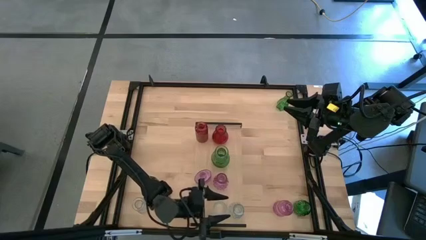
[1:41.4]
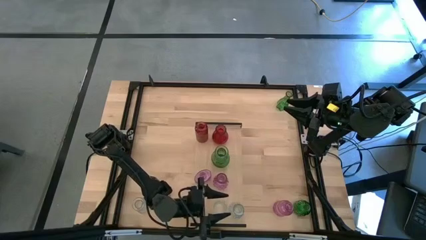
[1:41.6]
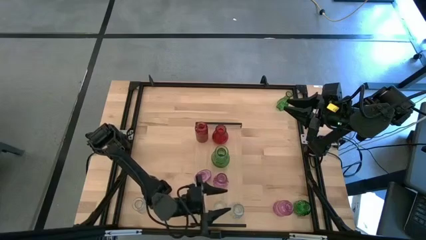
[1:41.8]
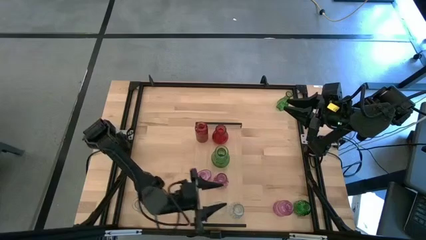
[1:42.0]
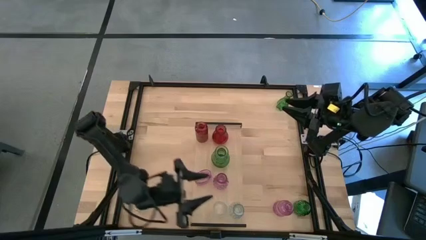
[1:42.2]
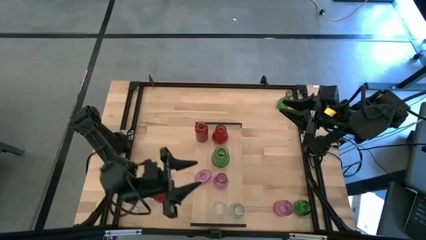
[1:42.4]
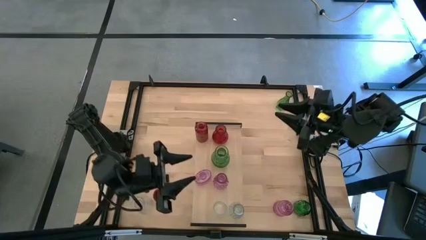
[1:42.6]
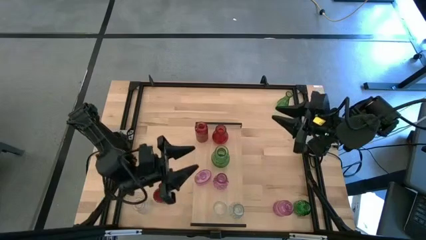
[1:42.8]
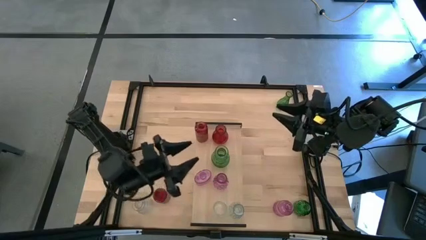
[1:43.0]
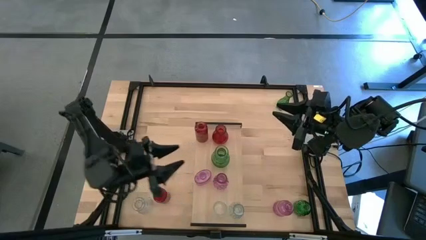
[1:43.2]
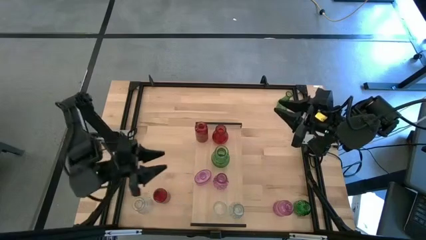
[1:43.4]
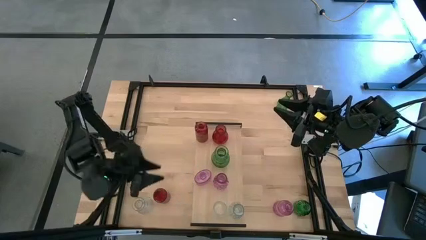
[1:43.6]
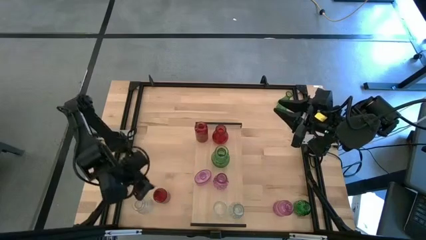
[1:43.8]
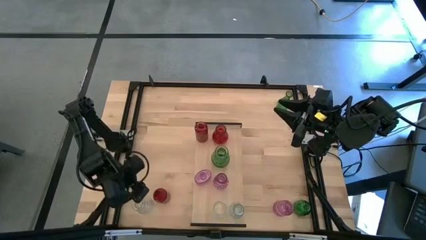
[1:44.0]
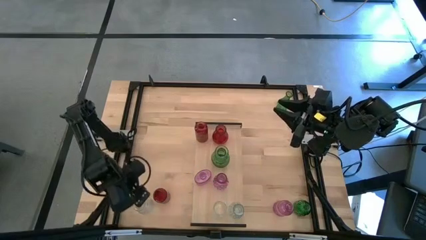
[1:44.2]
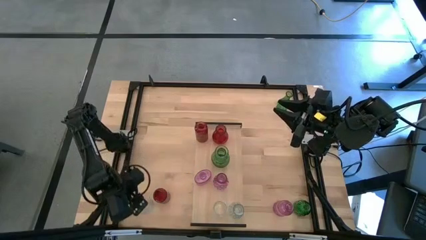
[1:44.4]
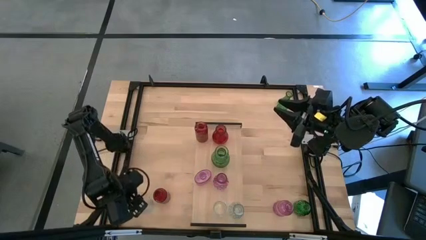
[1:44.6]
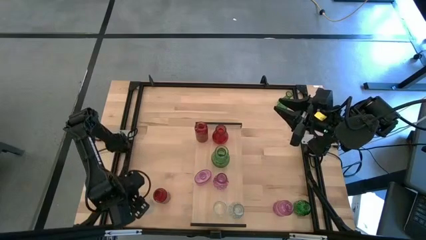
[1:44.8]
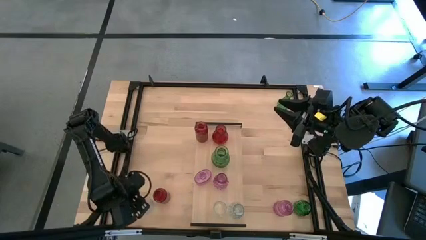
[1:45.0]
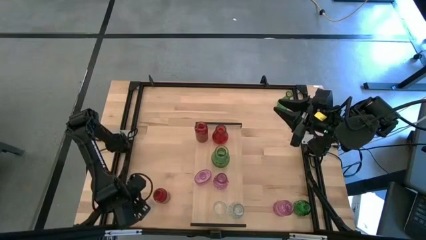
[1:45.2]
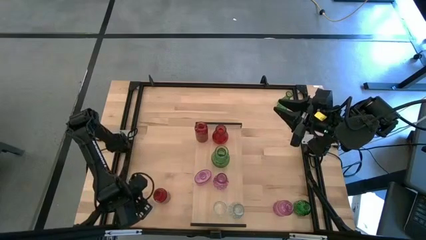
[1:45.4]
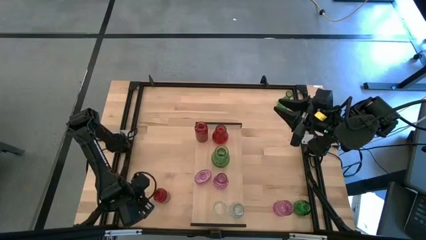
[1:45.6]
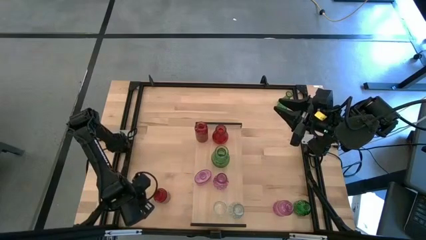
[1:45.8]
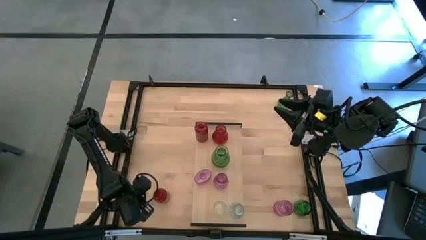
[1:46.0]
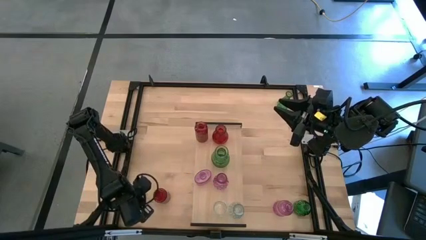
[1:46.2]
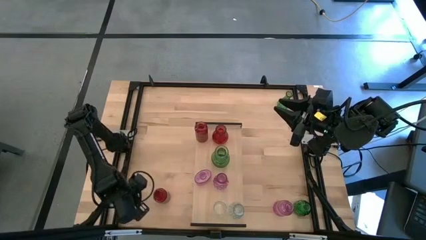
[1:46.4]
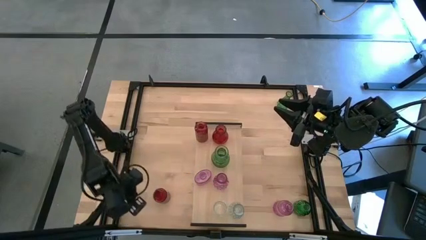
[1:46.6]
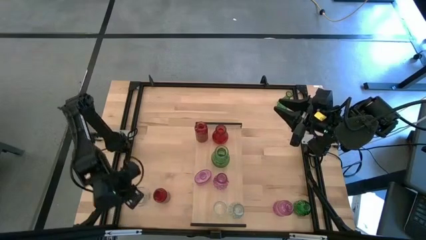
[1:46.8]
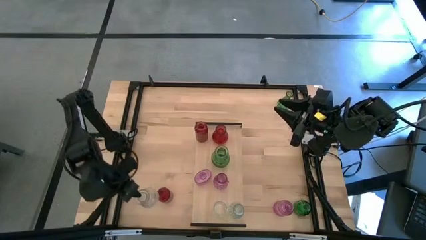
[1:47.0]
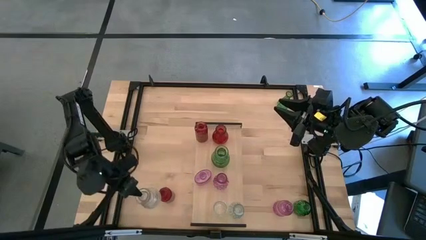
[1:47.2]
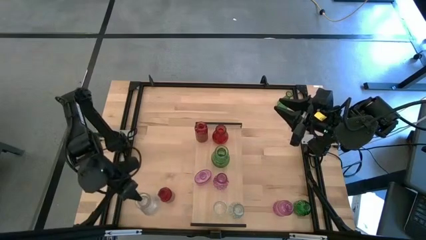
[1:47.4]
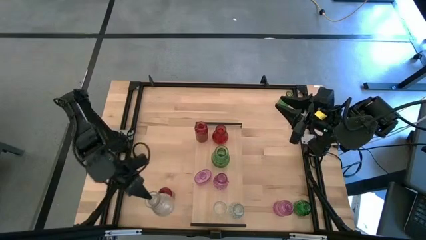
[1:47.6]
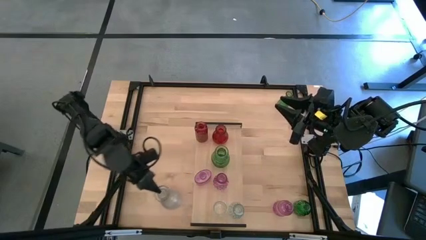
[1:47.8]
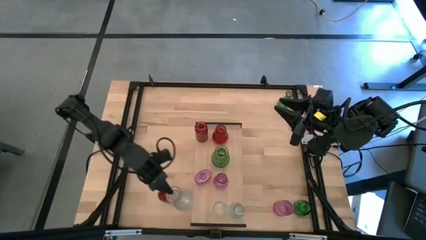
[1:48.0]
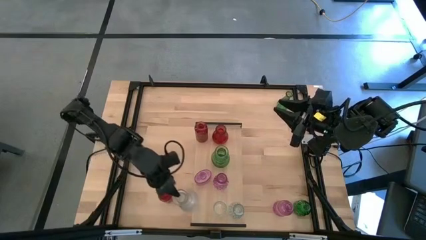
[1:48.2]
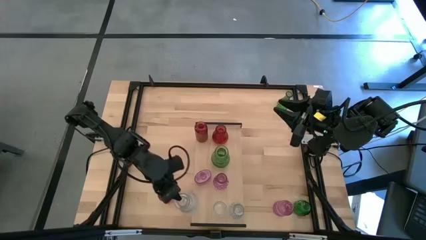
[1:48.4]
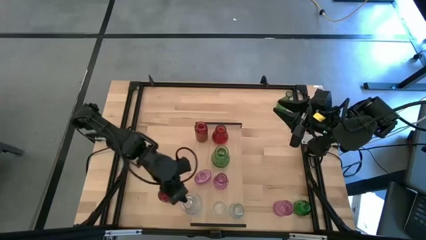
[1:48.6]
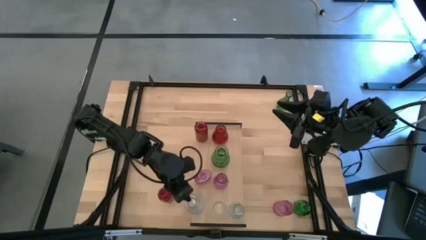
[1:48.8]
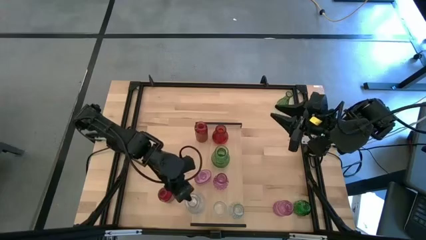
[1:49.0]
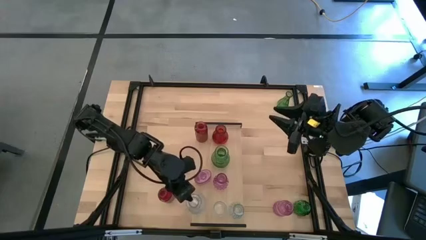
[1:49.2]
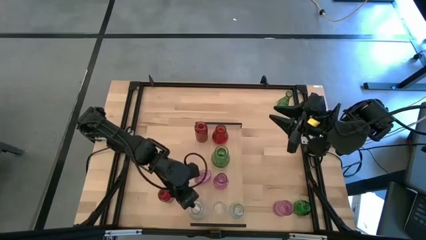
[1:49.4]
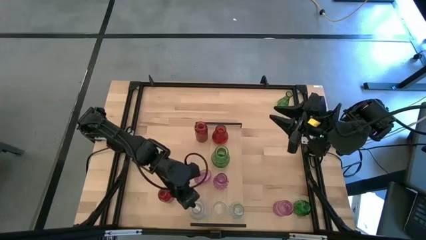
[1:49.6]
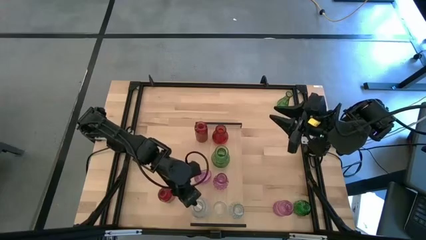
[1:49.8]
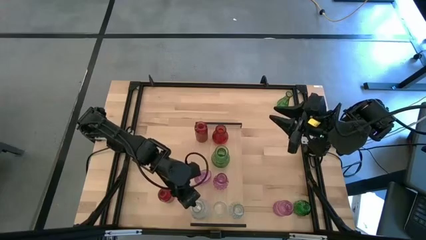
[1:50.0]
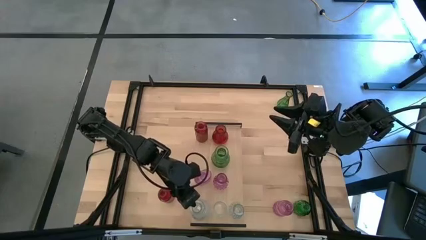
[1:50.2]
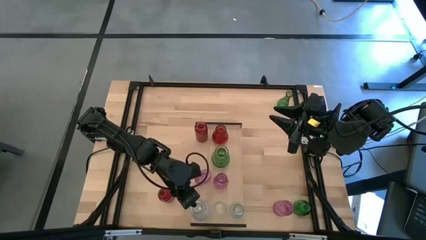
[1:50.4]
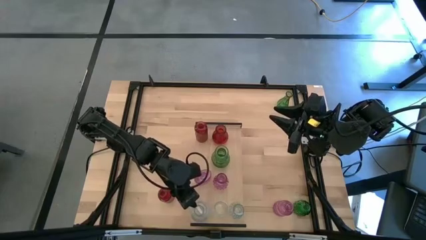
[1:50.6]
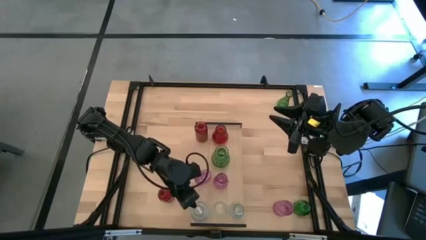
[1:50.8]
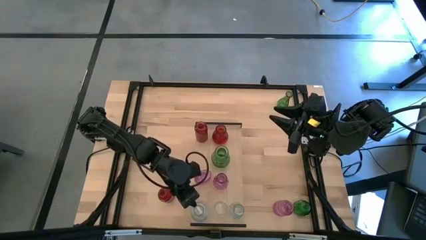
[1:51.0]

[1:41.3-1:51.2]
Task: sort vases onto shelf
Put the top white vase on the shelf aligned with the other white vases

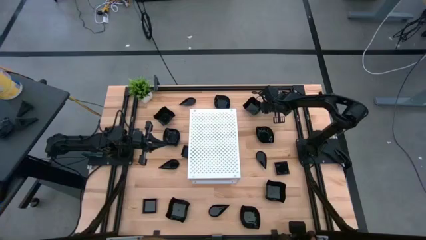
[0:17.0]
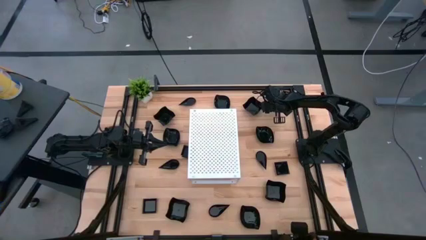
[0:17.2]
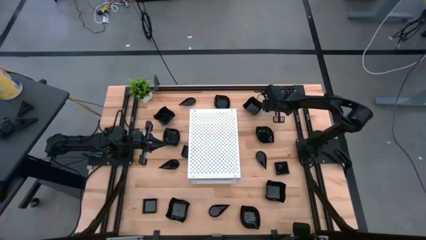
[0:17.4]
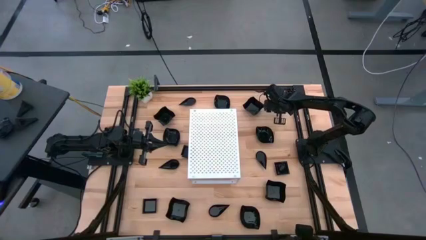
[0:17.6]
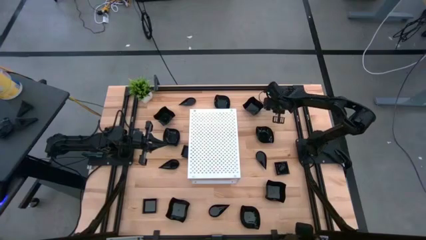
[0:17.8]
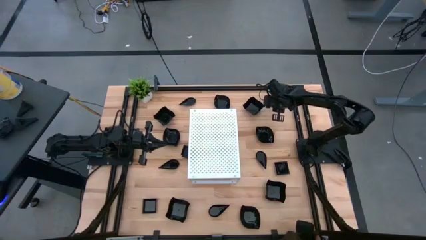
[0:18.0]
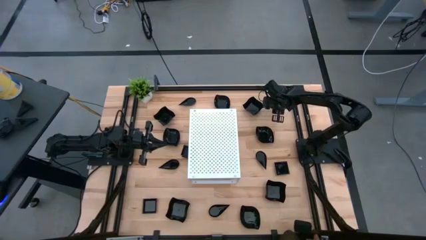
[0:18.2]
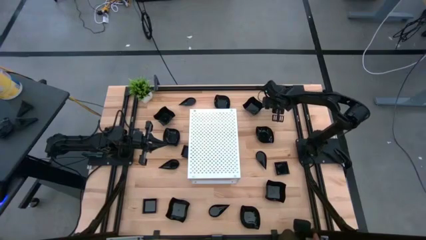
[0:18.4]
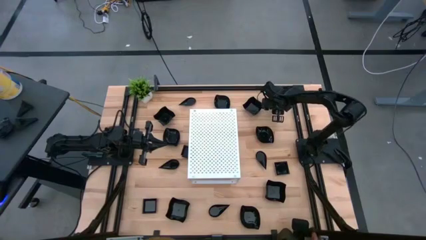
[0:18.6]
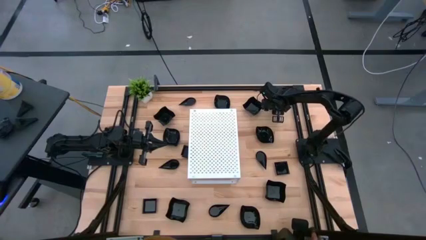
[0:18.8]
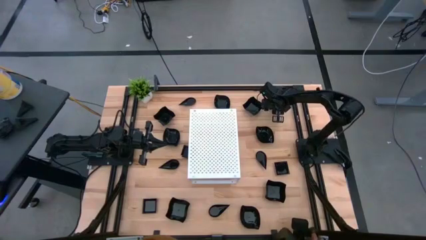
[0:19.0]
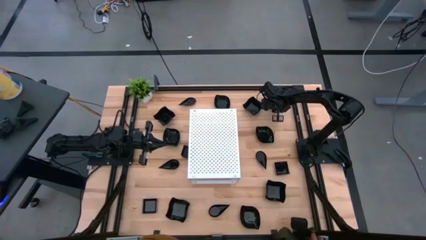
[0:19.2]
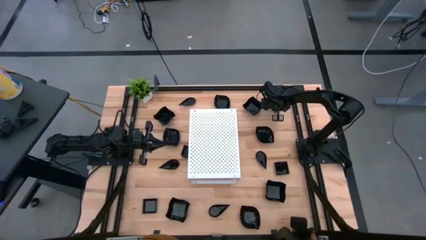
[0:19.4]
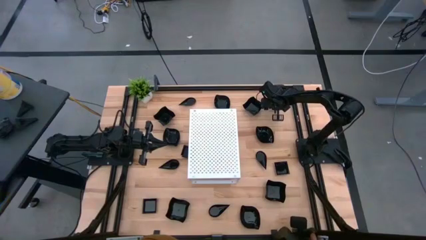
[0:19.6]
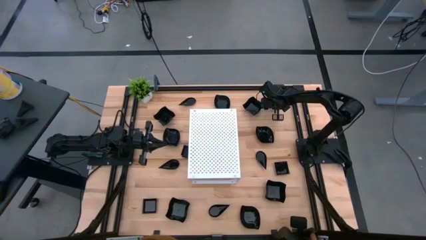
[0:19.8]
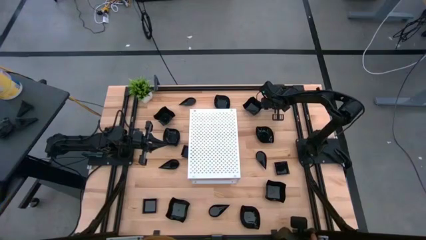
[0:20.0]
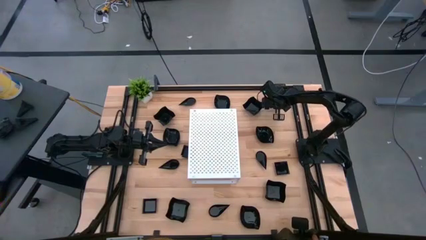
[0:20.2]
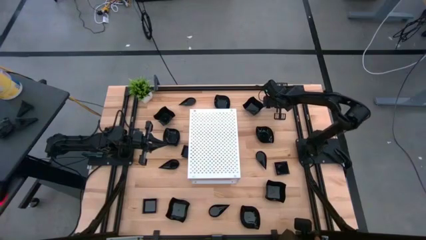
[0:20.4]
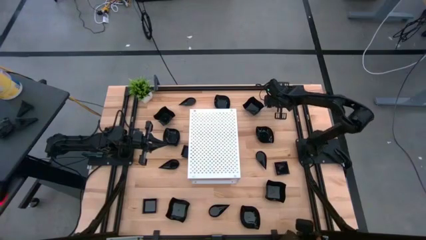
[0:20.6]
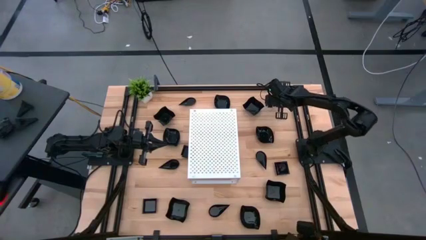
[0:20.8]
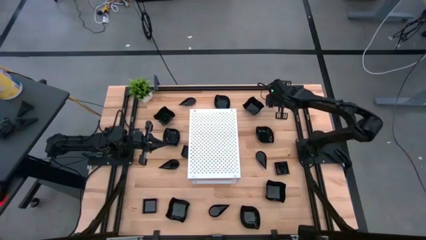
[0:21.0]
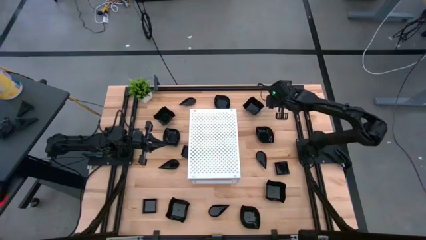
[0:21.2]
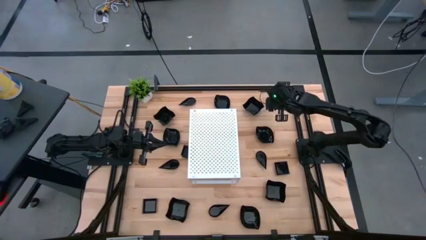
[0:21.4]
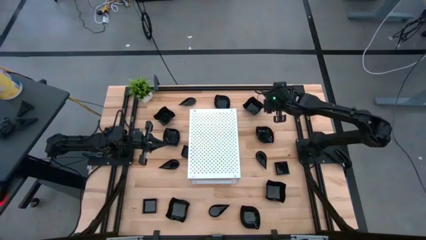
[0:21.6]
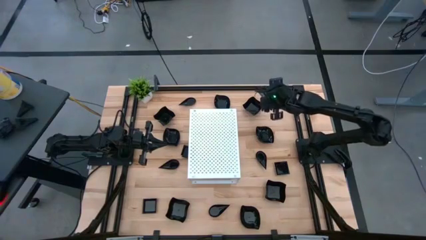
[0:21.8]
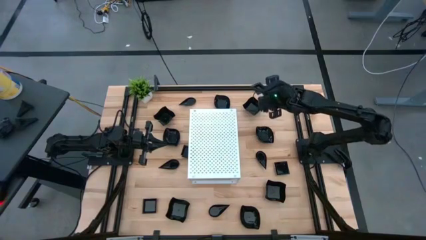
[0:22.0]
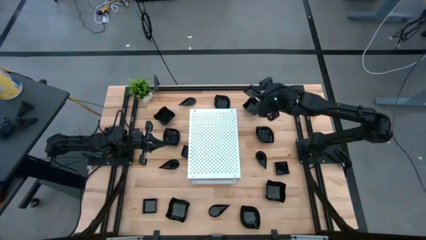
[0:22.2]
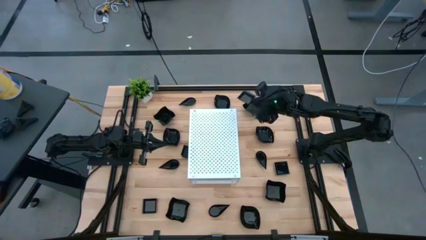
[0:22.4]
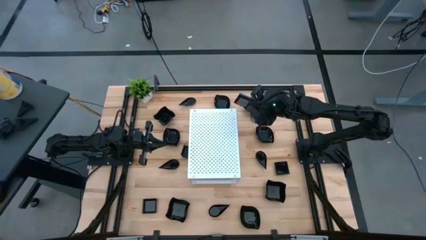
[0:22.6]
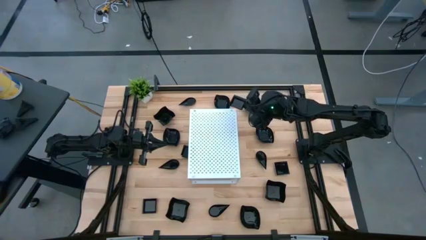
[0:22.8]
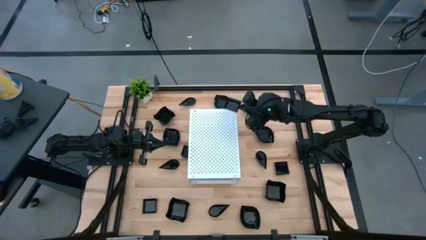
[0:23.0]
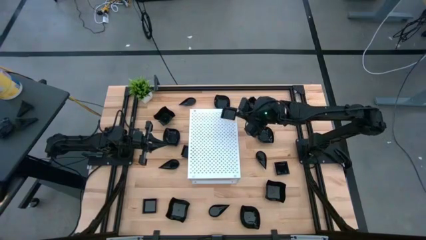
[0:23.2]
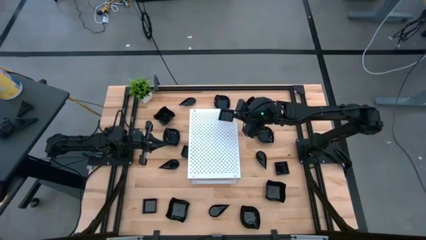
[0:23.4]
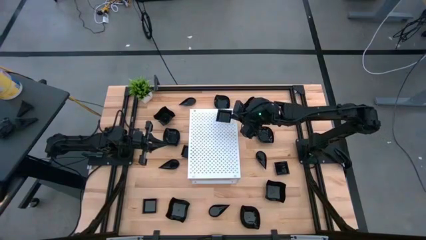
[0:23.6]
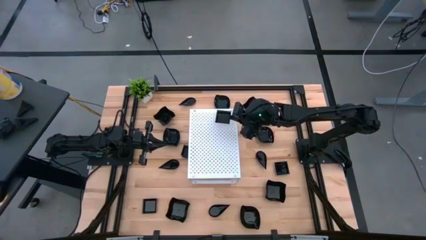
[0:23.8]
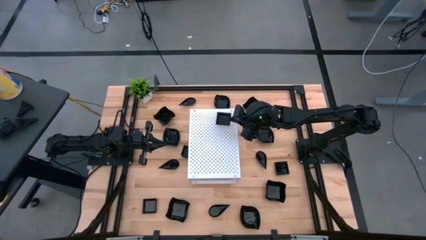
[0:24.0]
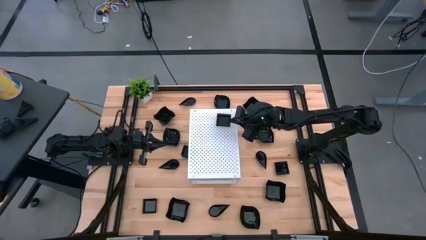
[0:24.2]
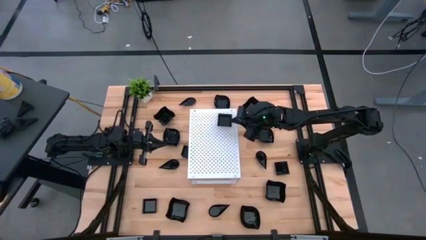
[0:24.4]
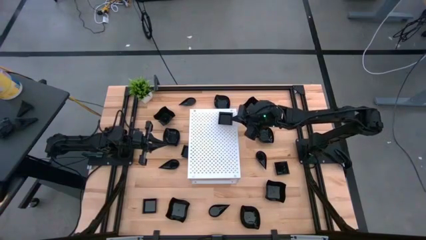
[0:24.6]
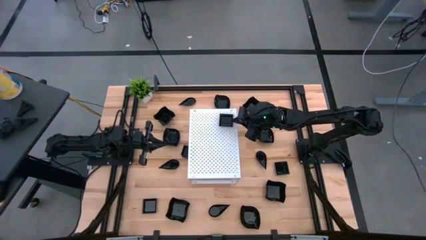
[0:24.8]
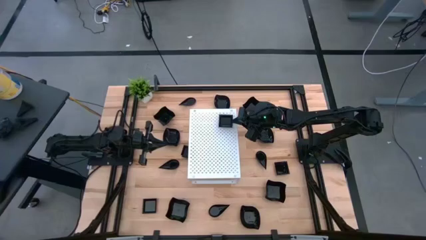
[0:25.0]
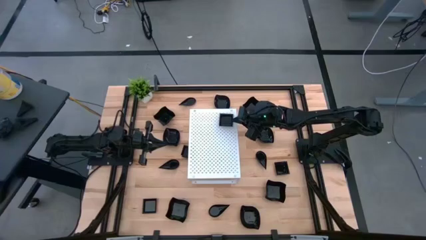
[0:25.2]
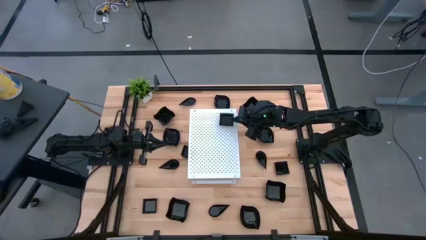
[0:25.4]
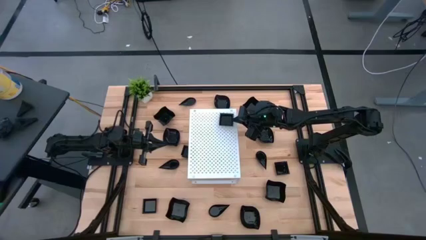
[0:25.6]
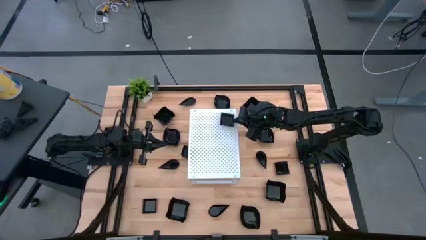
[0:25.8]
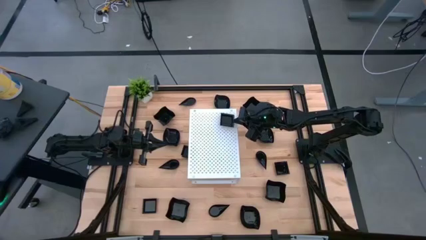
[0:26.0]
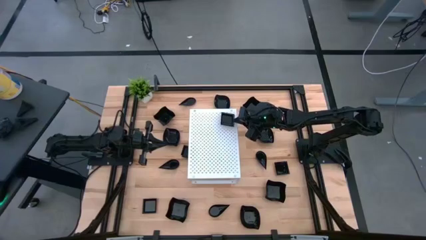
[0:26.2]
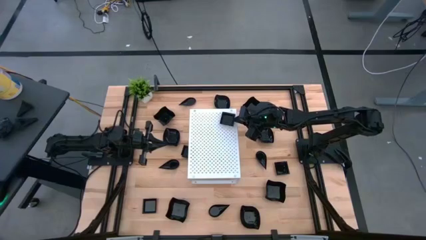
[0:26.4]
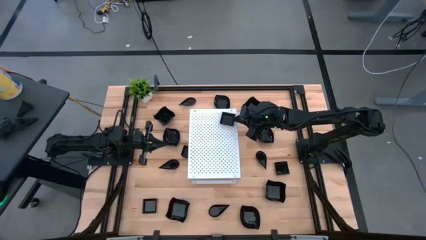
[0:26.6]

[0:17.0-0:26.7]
Task: Pick & Place Mini shaped plates
Put the black square plate on the shelf
